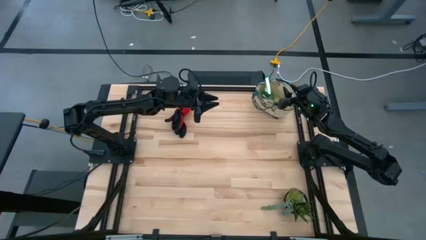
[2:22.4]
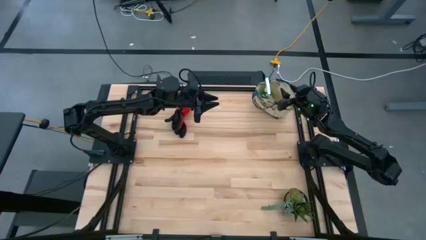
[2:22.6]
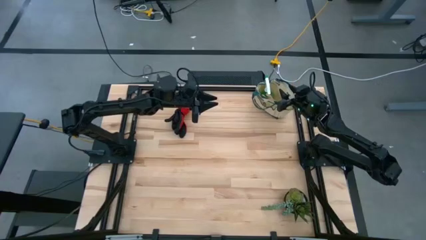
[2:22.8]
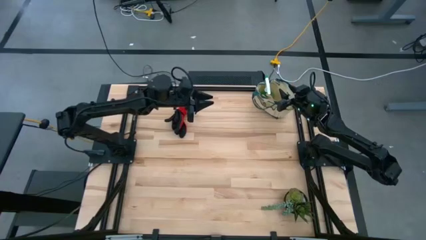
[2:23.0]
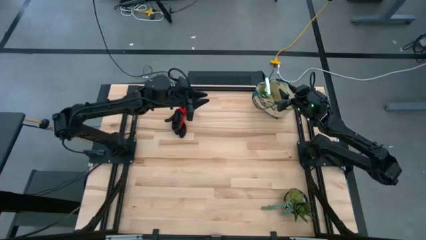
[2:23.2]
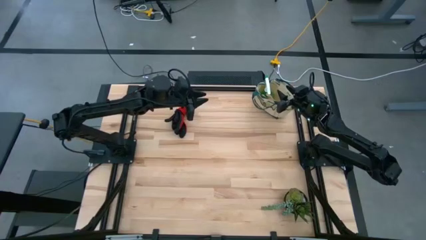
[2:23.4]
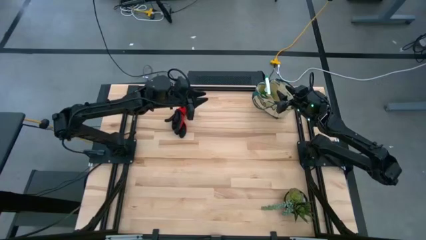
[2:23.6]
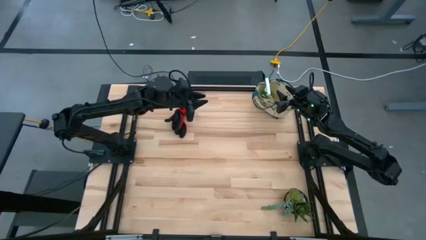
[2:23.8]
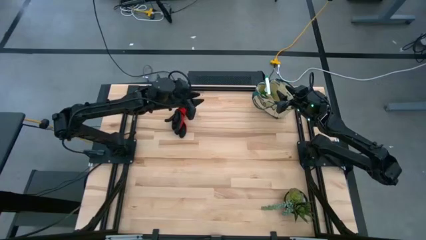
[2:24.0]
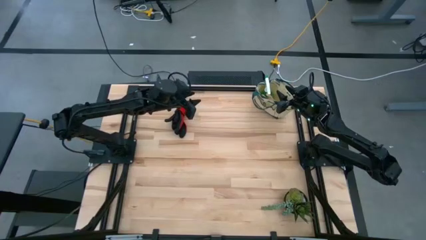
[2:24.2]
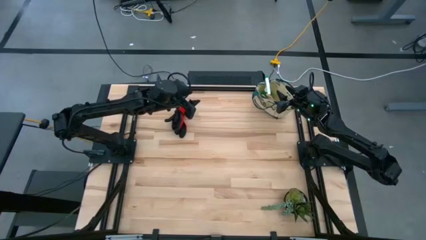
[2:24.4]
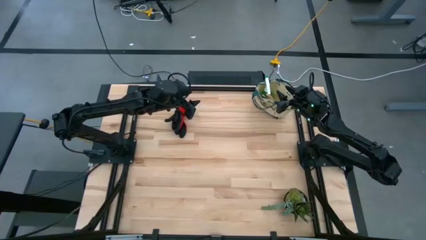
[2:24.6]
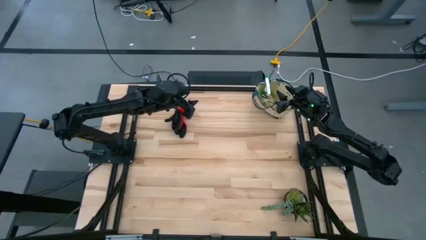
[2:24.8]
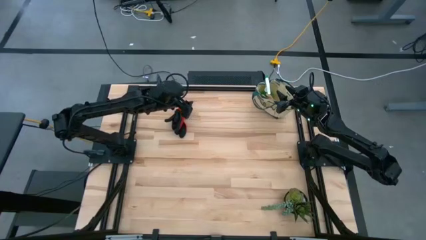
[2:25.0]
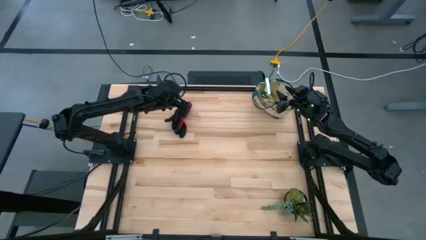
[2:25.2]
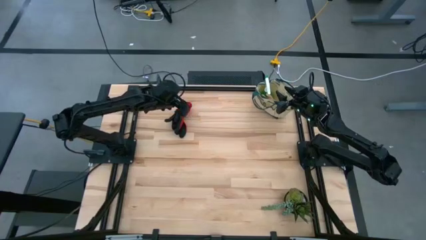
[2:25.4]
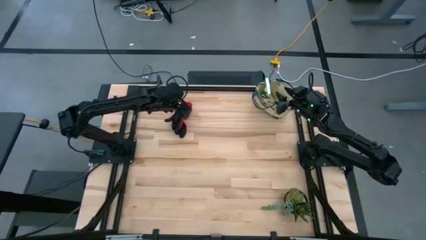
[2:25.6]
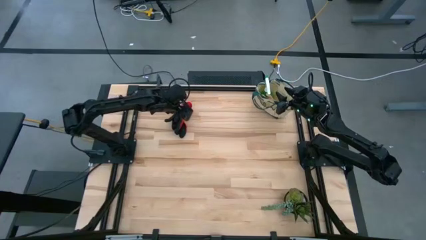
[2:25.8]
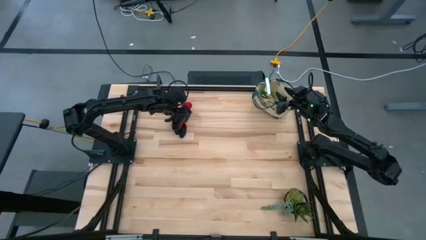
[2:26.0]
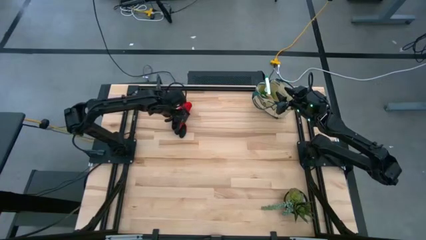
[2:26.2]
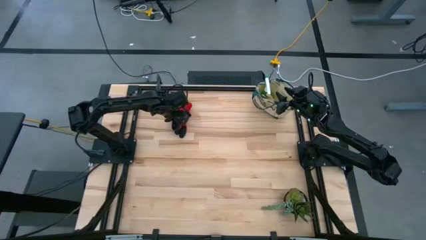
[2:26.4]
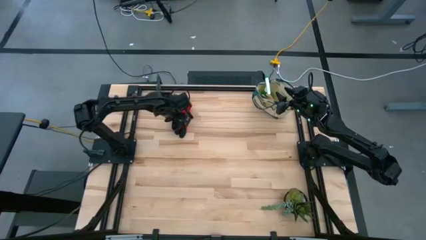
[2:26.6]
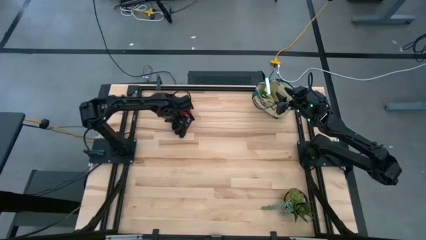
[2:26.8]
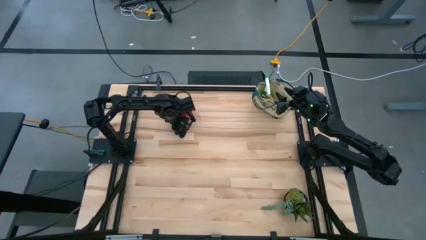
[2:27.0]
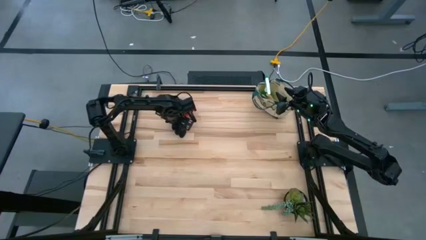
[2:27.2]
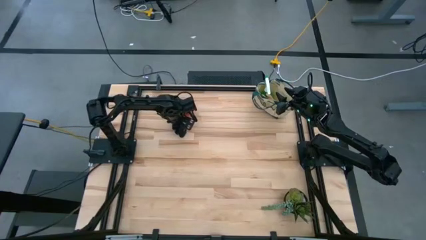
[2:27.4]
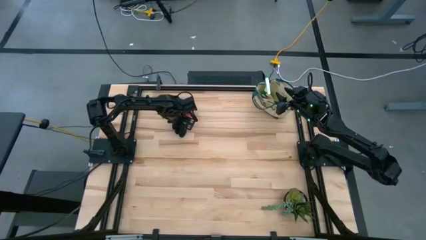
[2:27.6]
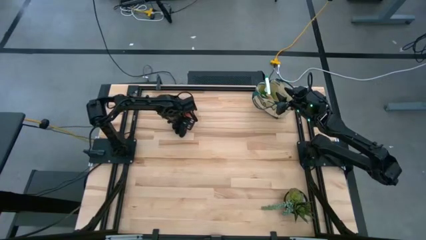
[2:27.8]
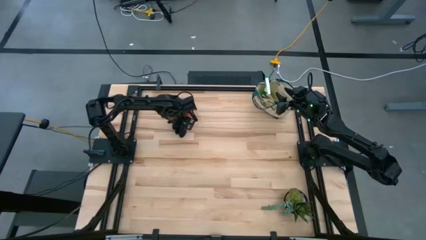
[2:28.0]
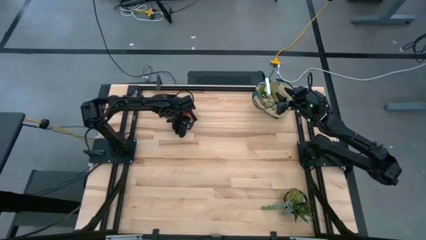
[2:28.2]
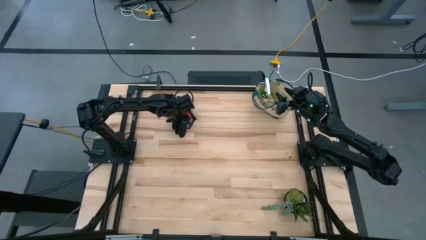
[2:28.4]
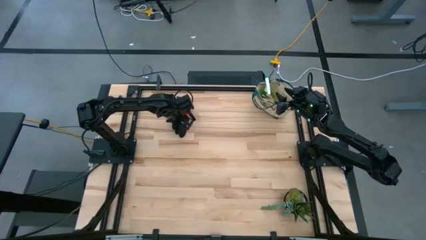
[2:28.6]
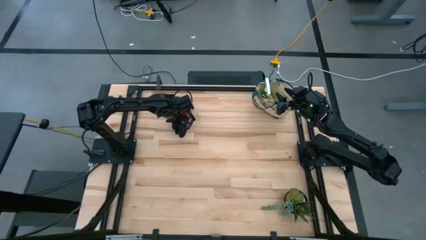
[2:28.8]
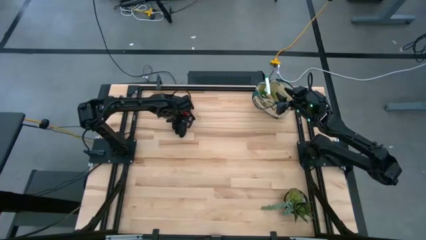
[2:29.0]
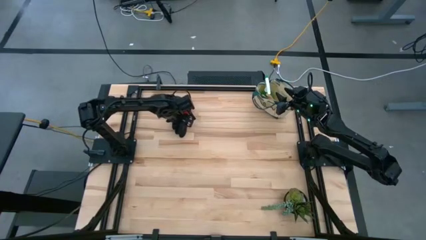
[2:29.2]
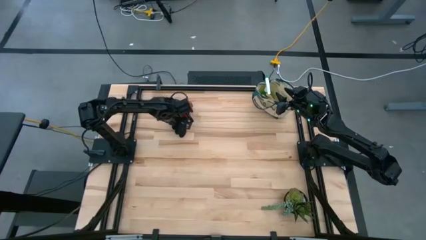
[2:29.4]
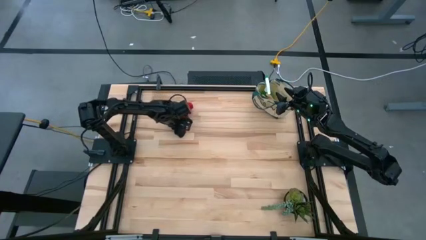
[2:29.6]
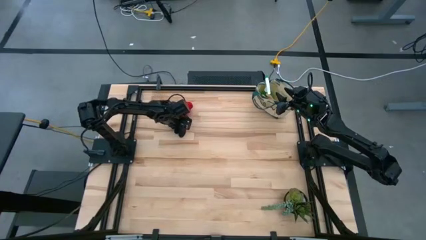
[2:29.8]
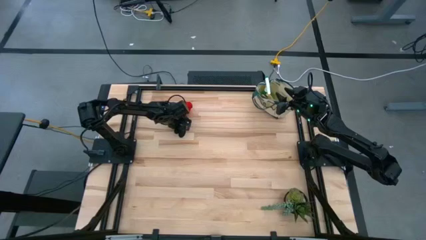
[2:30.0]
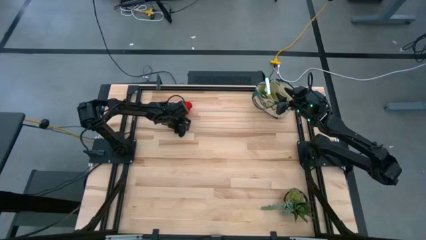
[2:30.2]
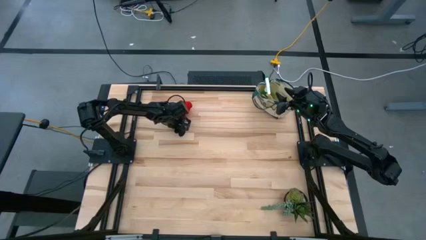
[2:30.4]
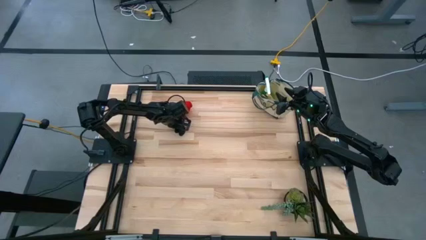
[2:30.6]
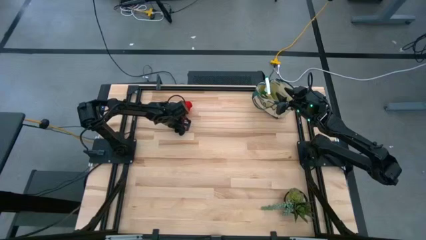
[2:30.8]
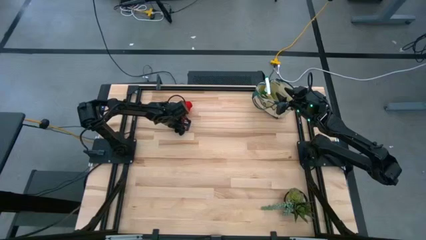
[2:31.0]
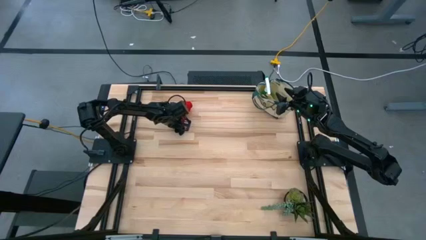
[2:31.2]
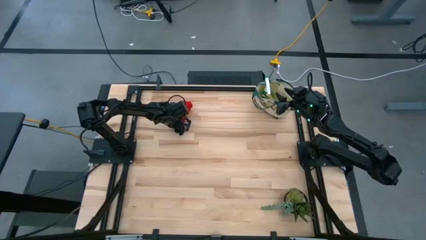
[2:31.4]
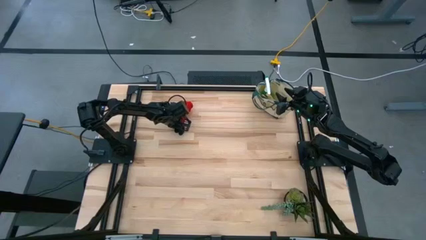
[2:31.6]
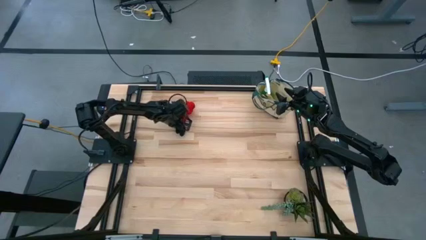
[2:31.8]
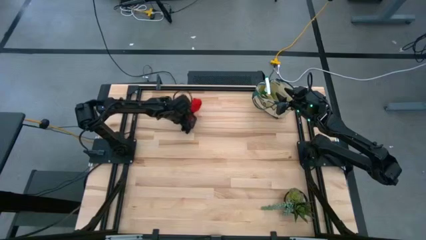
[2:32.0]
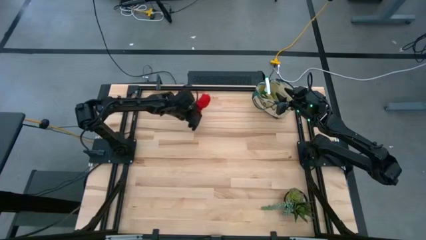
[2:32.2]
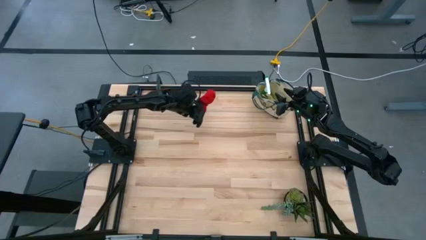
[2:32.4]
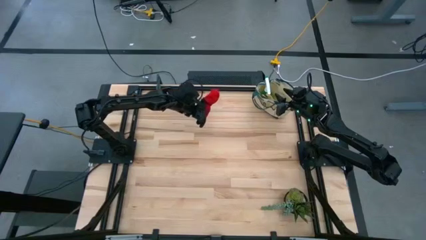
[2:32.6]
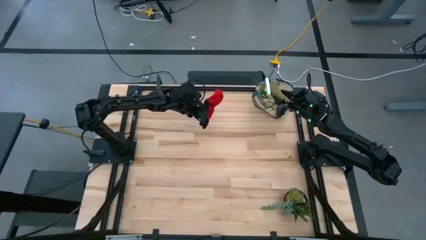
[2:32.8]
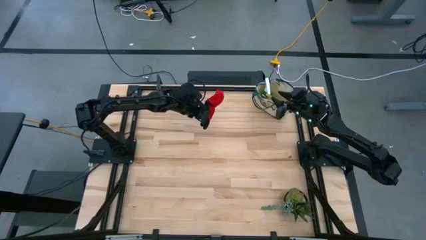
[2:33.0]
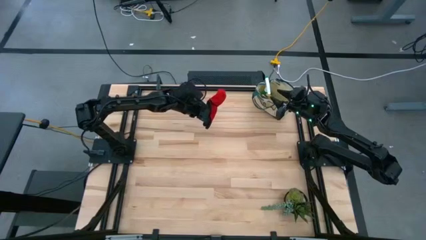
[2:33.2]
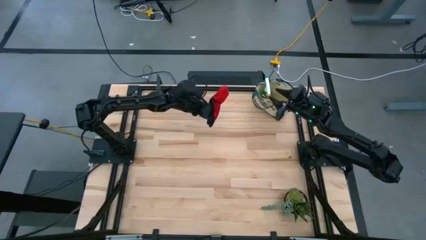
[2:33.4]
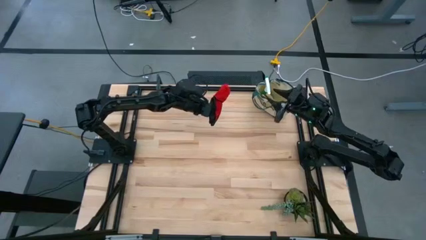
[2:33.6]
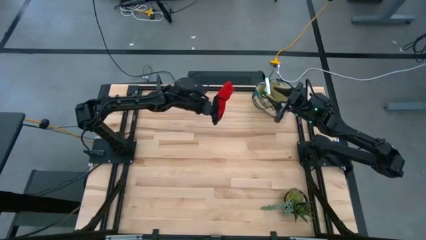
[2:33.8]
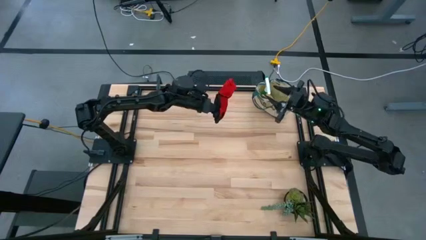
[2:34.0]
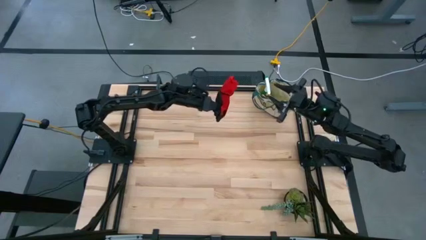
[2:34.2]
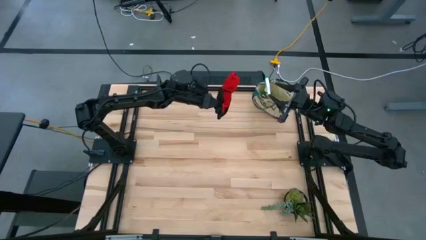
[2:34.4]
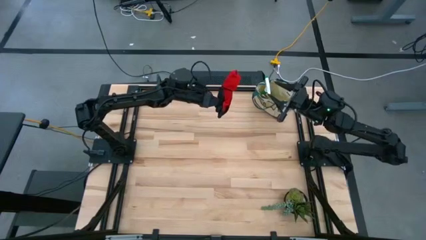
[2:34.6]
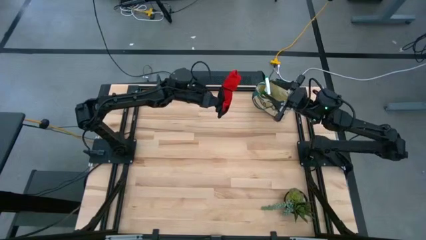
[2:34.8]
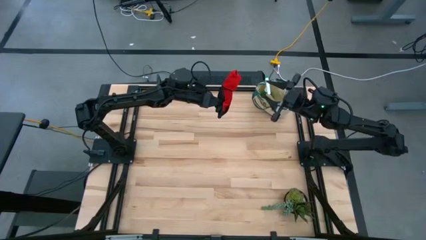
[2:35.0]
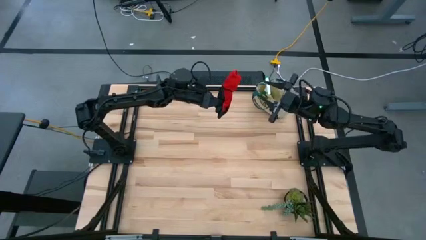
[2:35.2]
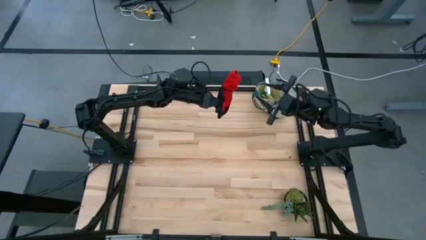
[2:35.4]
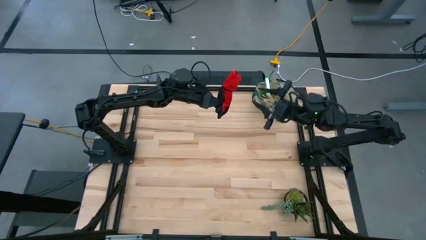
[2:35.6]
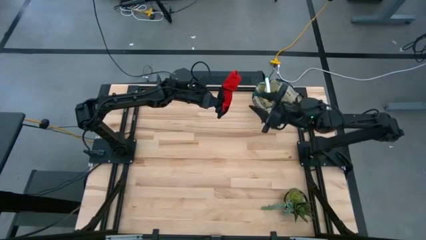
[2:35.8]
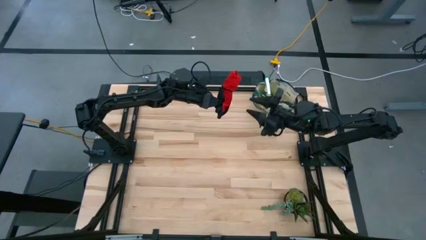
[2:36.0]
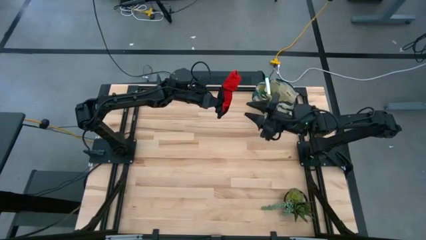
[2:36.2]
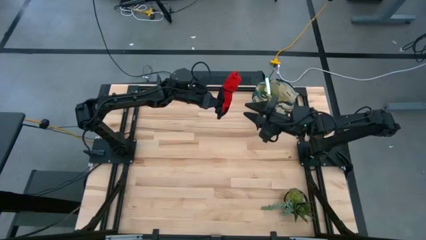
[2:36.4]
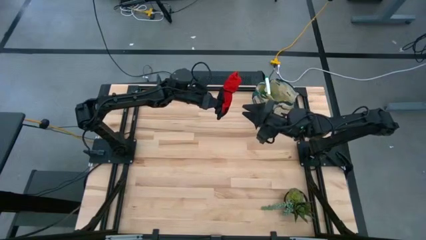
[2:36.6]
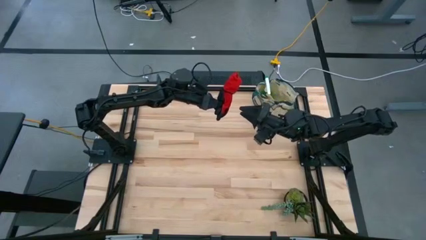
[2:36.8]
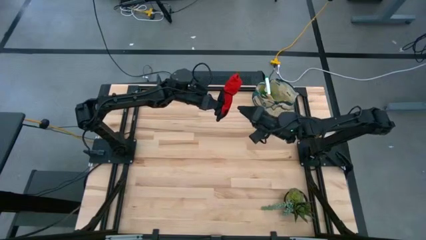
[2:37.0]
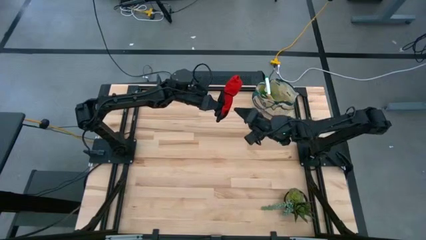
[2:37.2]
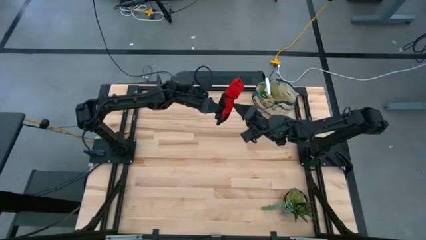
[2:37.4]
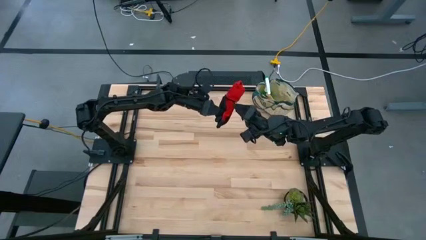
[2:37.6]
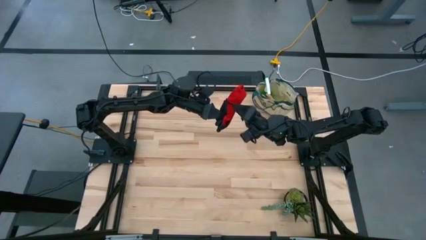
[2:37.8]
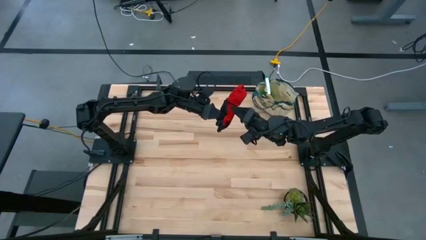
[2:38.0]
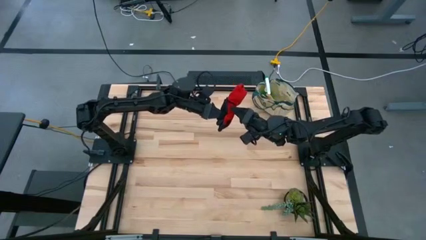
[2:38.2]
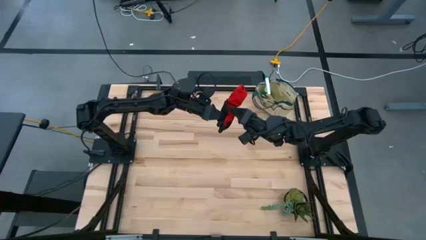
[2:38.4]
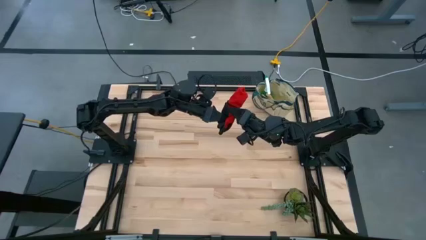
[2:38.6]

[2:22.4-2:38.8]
Task: Pick & Place Garden tools in Gardening bag
Put the red gloves into the gardening bag

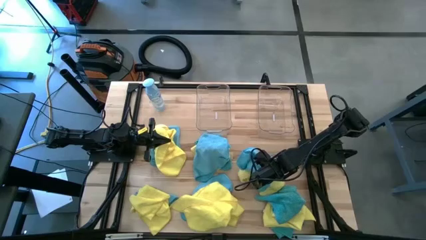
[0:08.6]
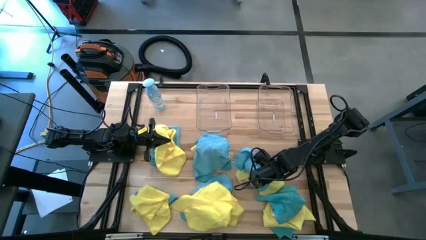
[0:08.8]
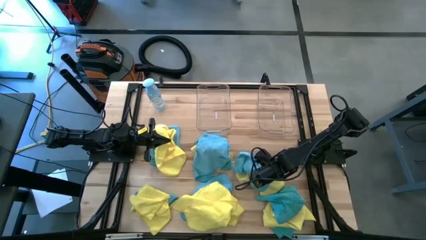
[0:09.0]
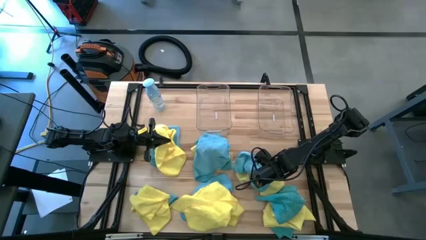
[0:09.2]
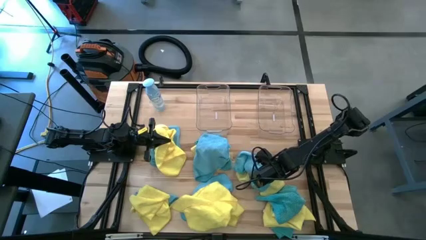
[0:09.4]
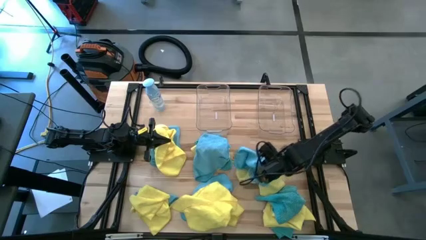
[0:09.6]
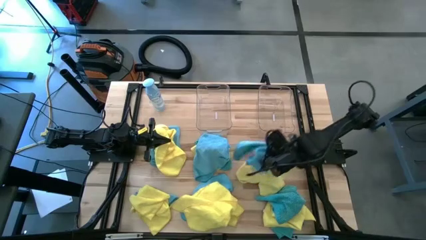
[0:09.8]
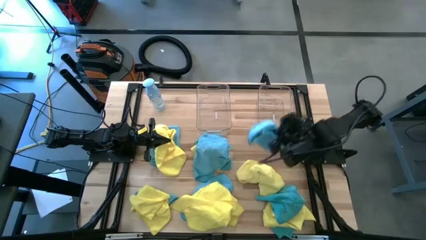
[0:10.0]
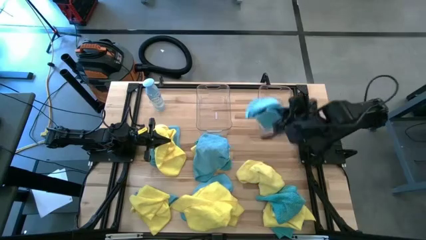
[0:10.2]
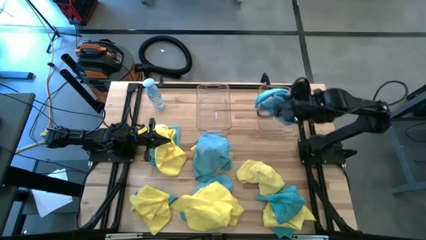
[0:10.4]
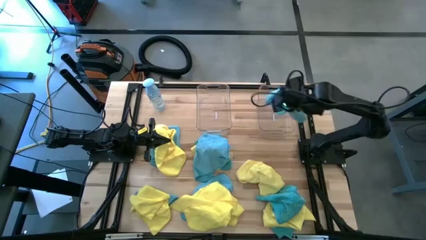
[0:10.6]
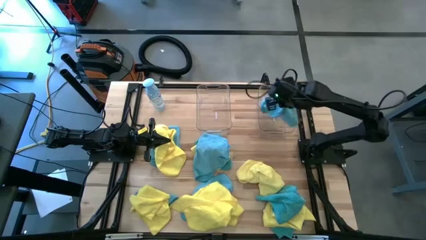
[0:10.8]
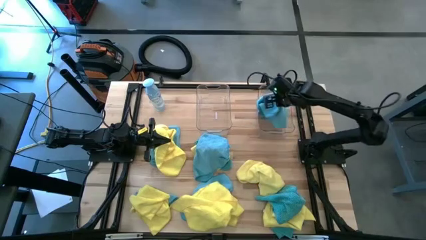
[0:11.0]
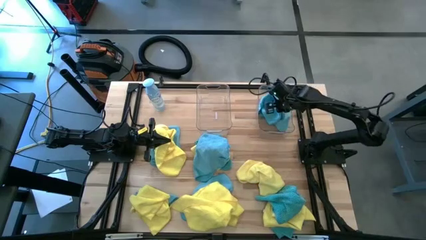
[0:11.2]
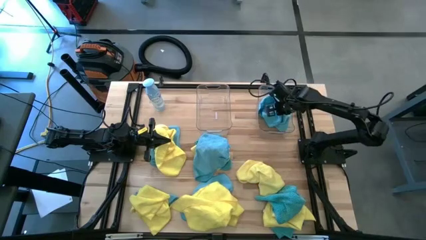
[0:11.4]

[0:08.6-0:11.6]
Task: Sort microfiber towel by color & place in baskets
Put the blue towel into the right transparent bin
